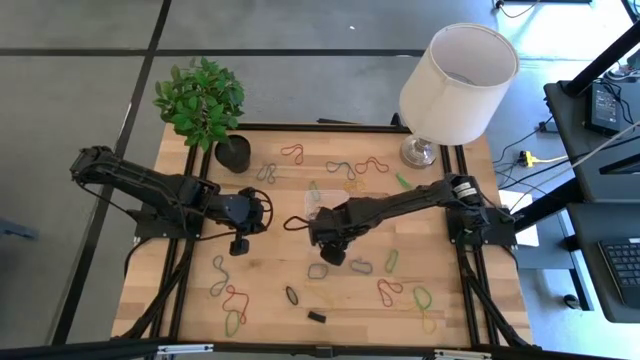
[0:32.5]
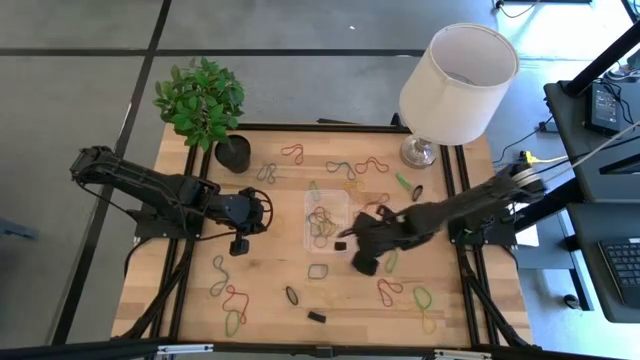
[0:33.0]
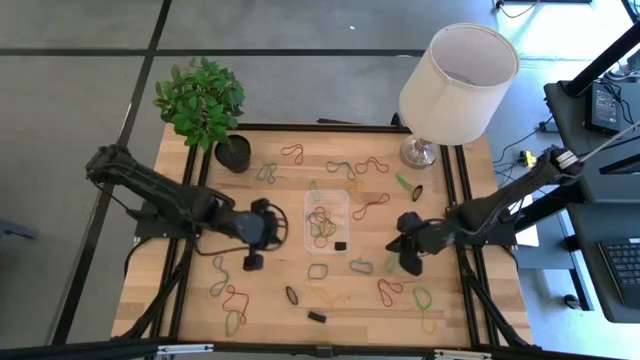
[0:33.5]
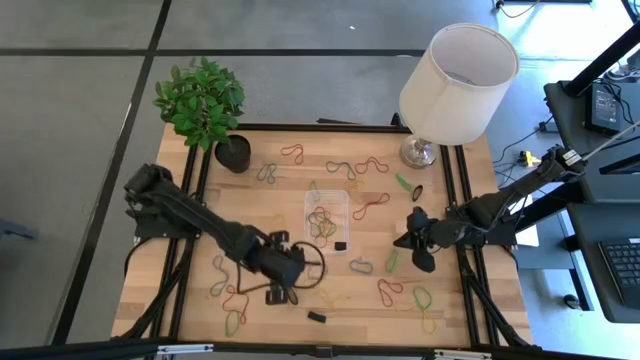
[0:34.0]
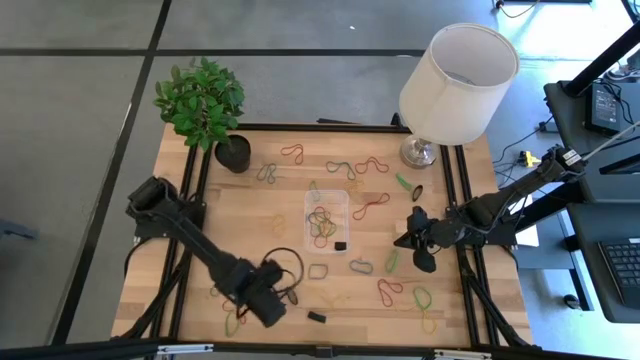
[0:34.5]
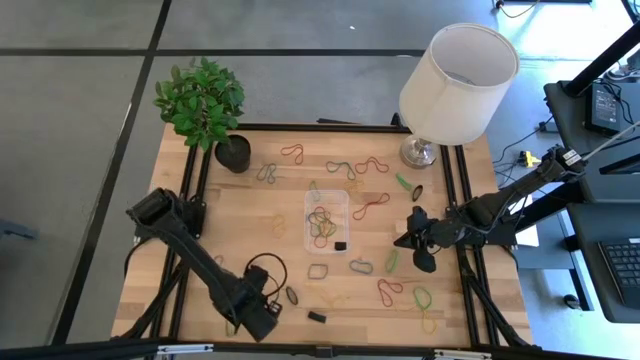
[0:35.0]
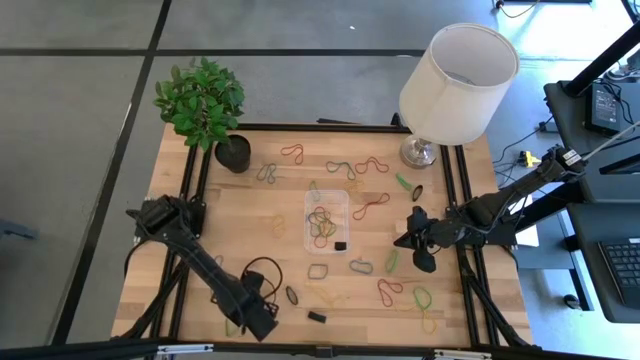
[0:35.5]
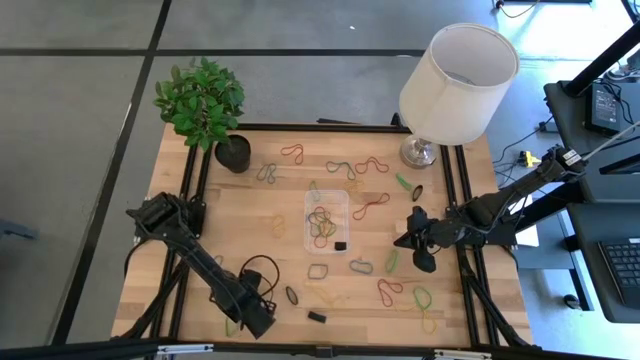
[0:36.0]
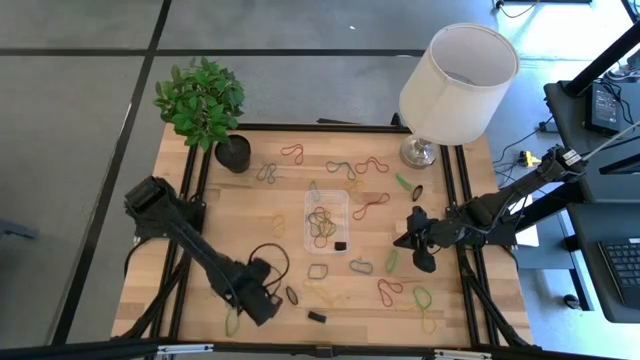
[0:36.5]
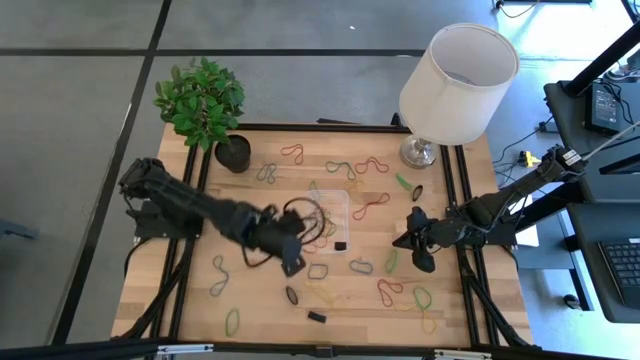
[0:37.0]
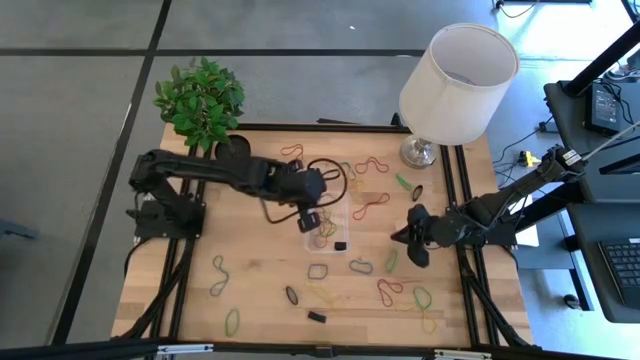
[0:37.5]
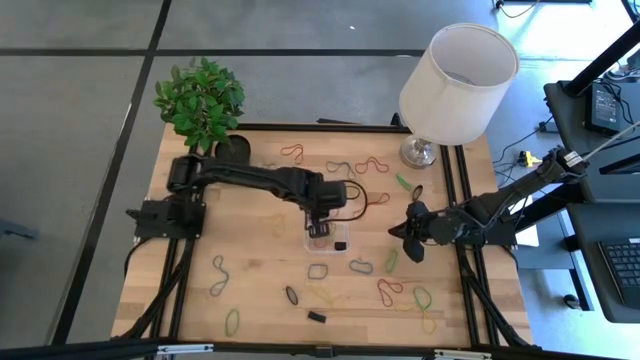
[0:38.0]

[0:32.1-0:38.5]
Task: Pick and place rubber bands into bin
Put the red rubber band into the transparent container

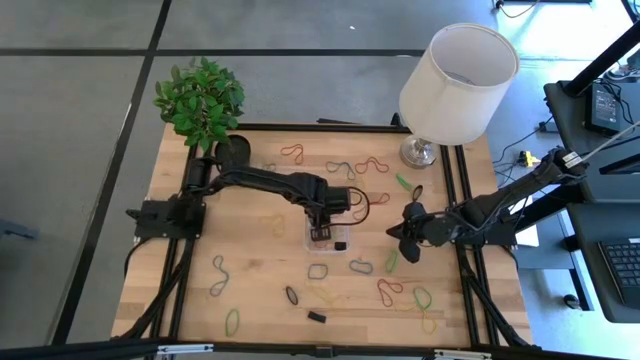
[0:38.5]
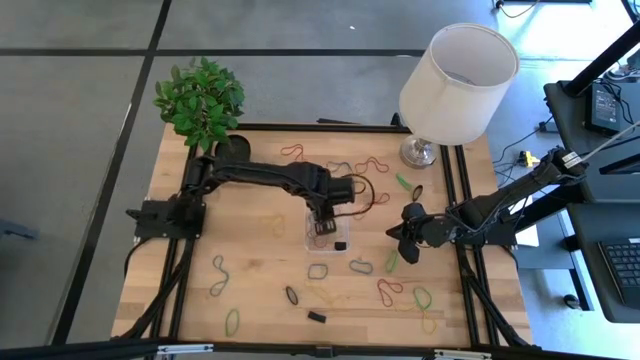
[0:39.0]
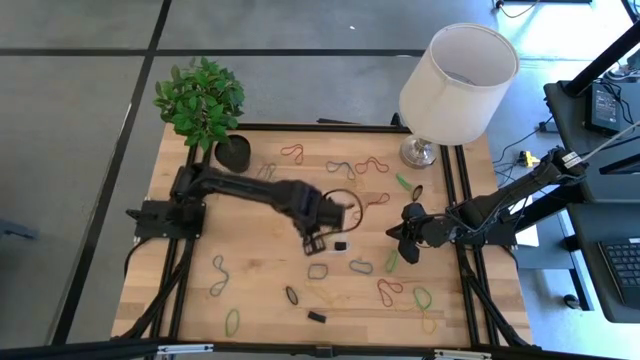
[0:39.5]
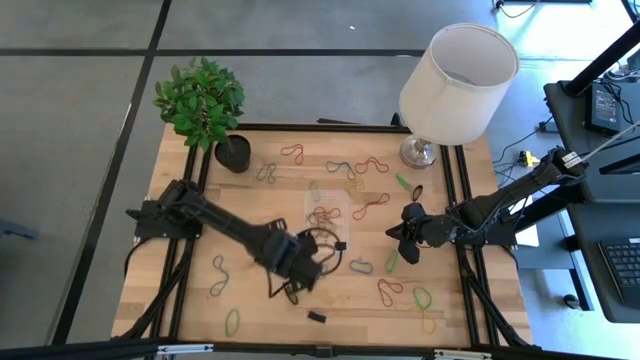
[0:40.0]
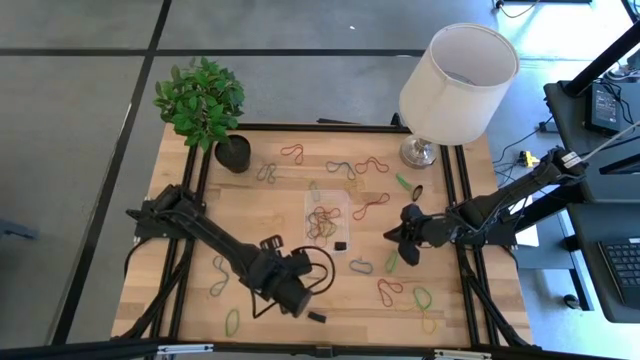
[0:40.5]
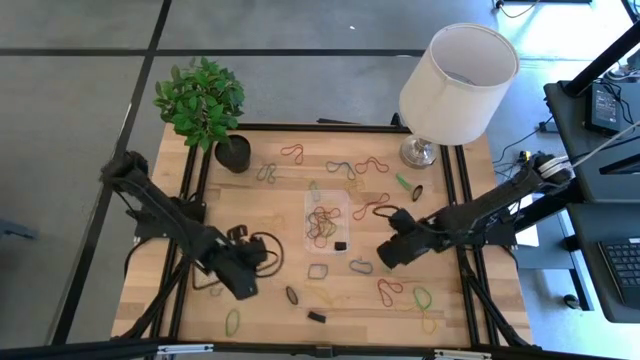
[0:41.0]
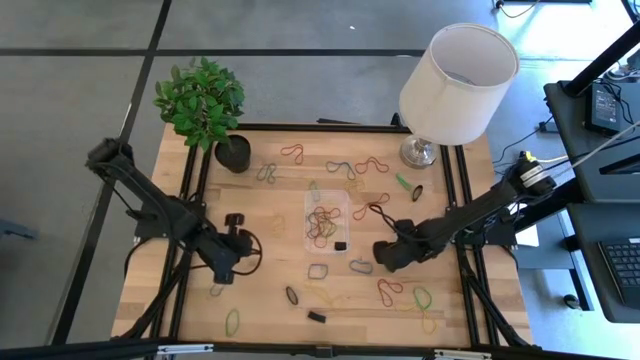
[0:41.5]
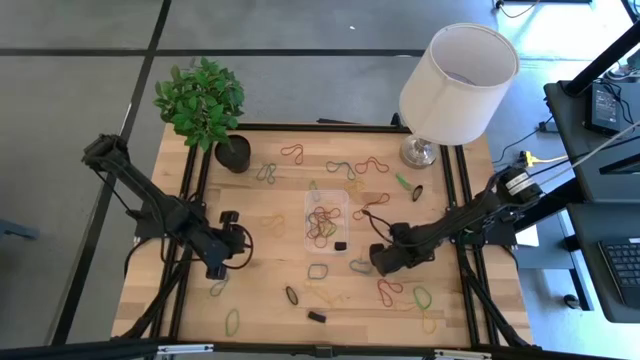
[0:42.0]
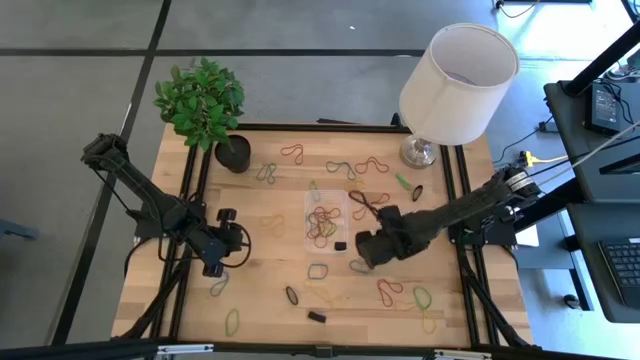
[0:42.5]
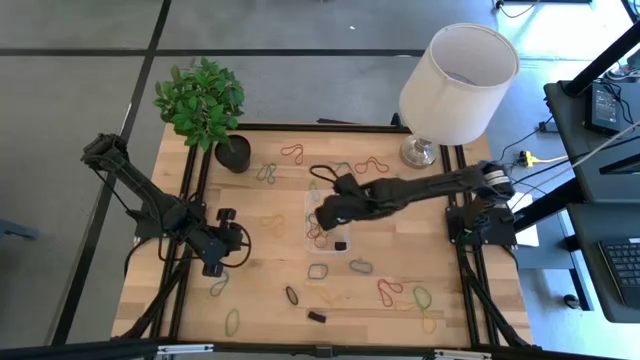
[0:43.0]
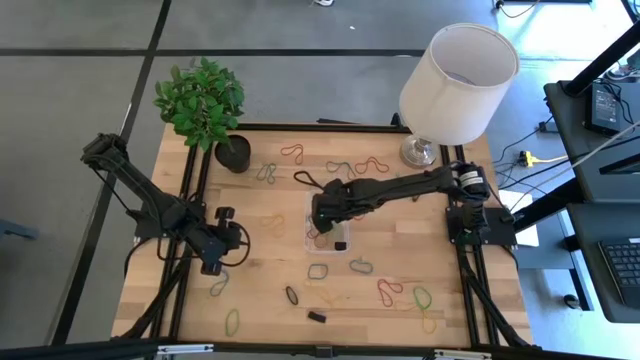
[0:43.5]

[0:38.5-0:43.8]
Put the green rubber band into the transparent container

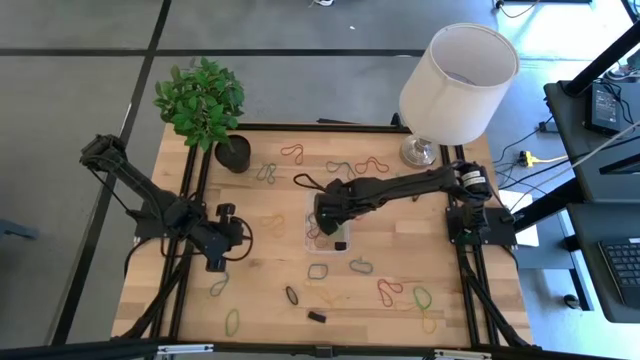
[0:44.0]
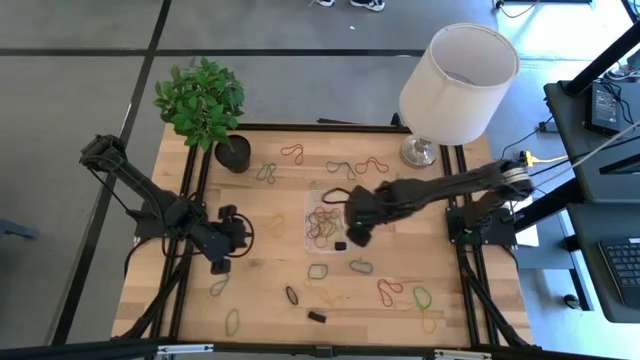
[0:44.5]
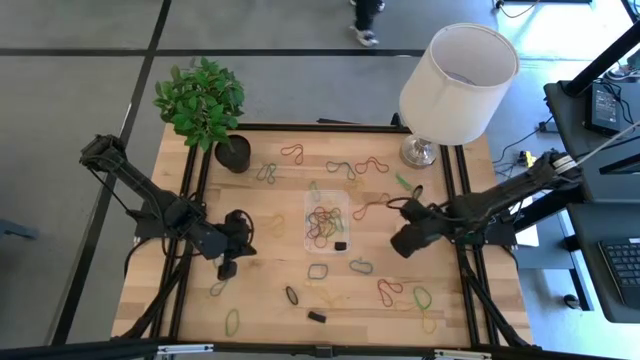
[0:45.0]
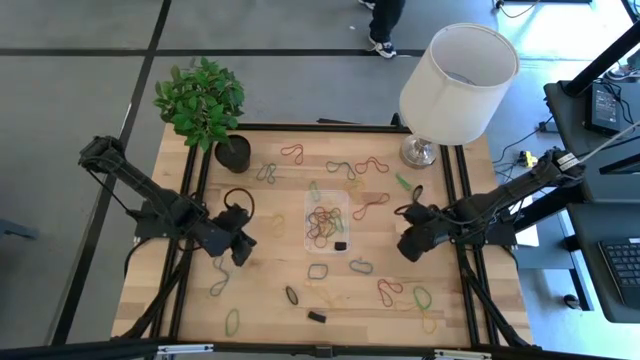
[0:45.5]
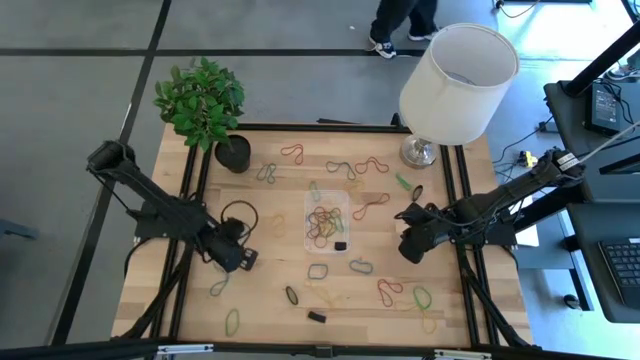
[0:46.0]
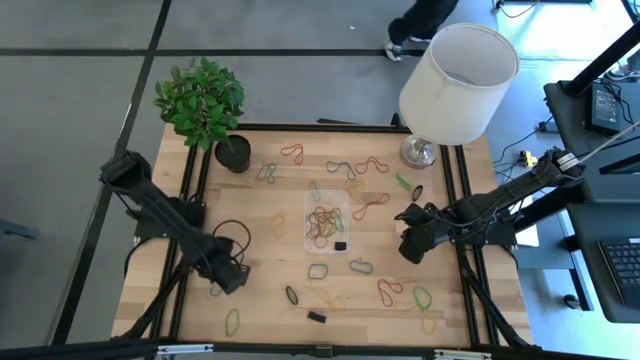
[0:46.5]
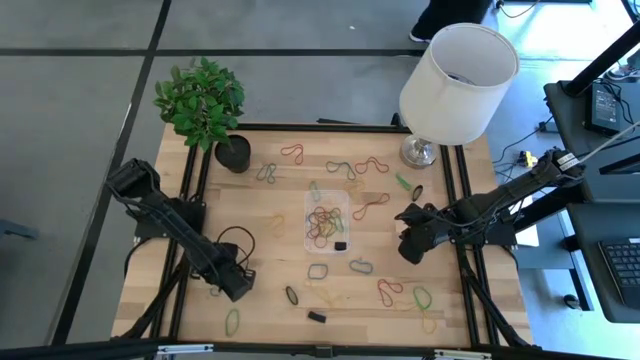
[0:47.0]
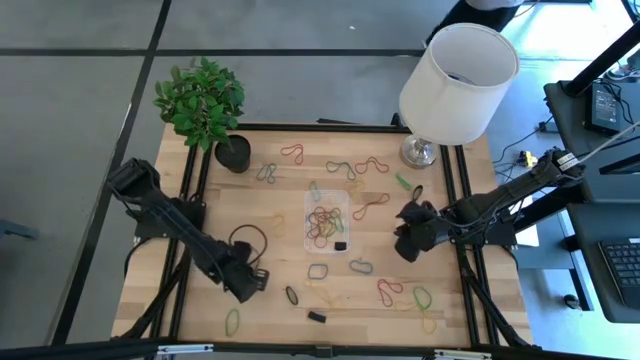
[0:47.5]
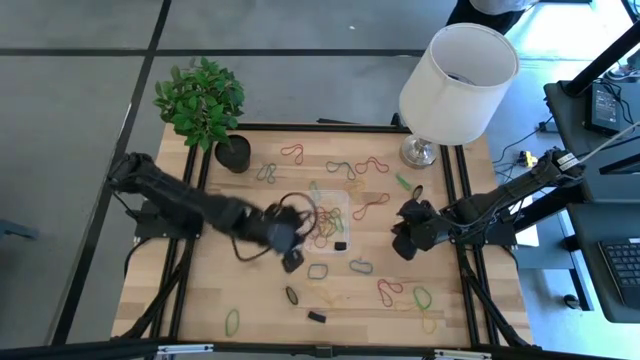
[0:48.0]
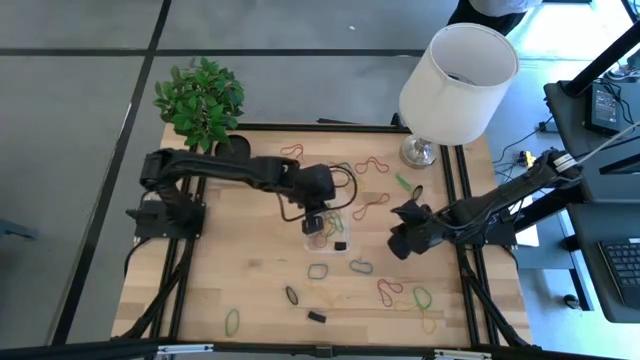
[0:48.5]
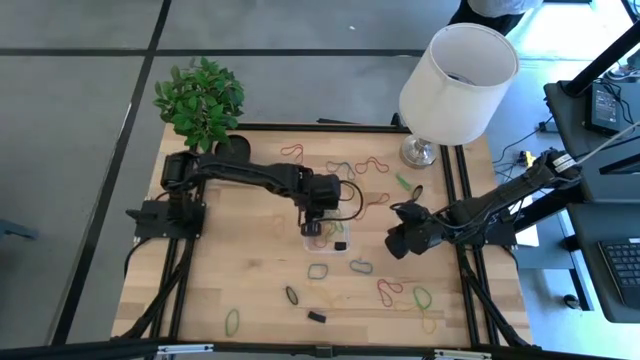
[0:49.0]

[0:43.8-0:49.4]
Put the blue rubber band into the transparent container

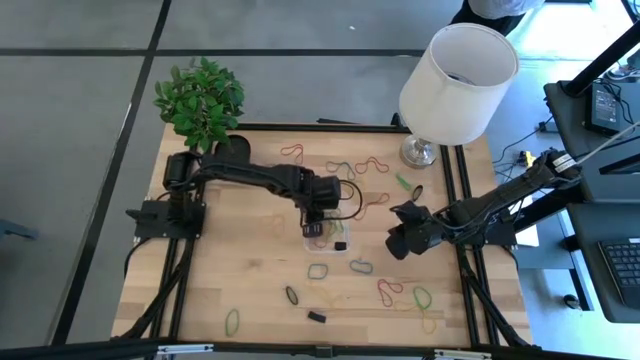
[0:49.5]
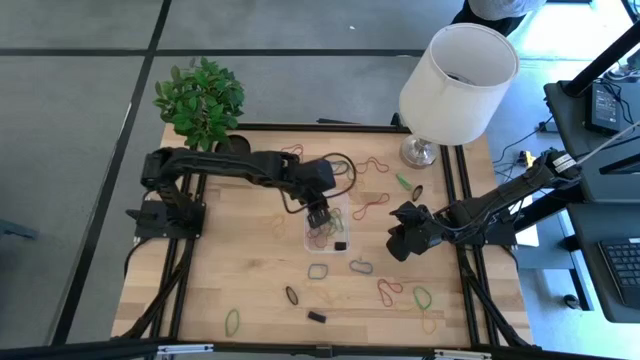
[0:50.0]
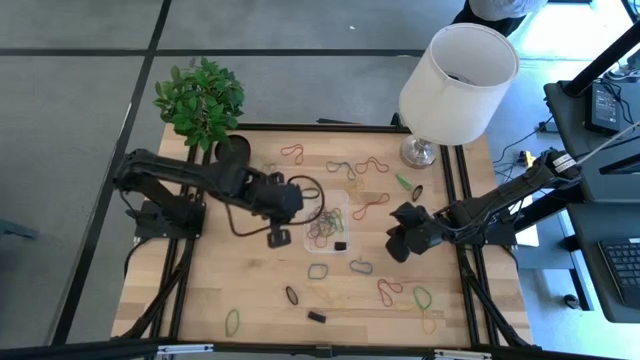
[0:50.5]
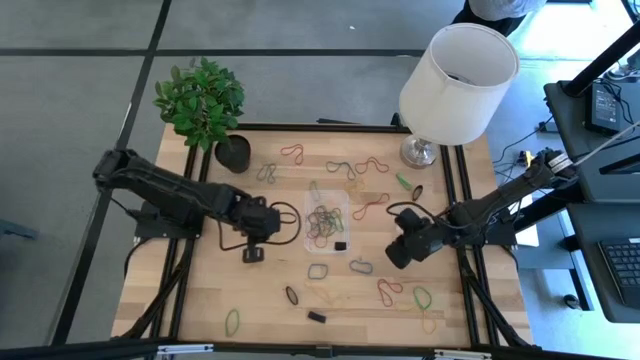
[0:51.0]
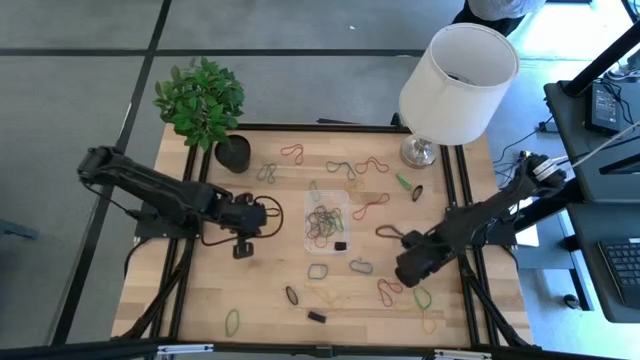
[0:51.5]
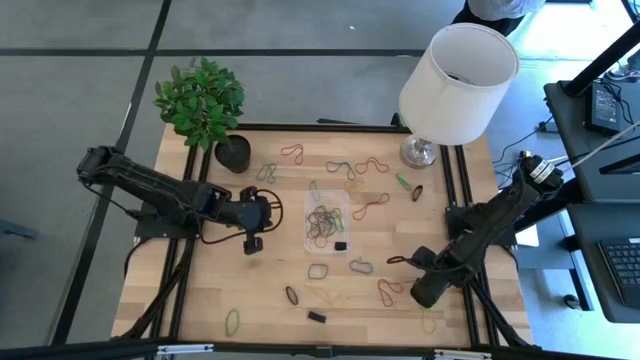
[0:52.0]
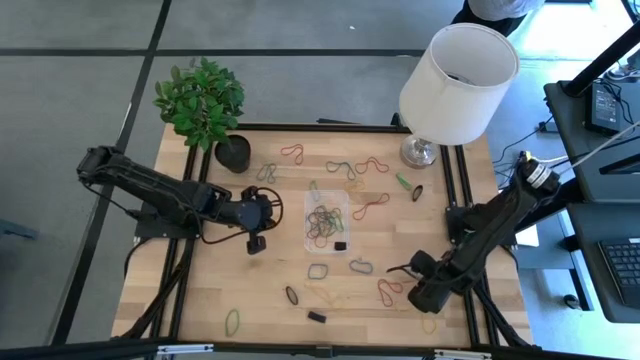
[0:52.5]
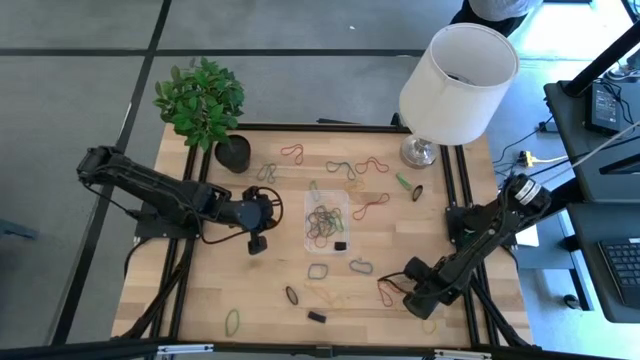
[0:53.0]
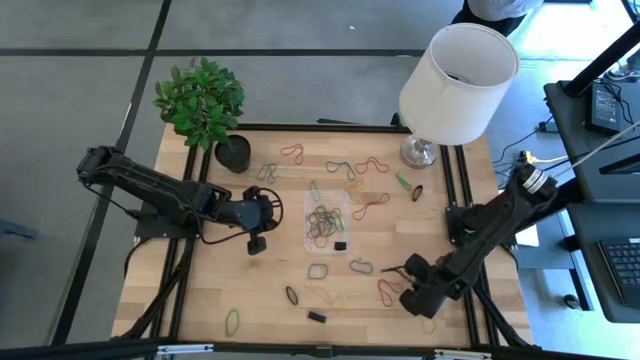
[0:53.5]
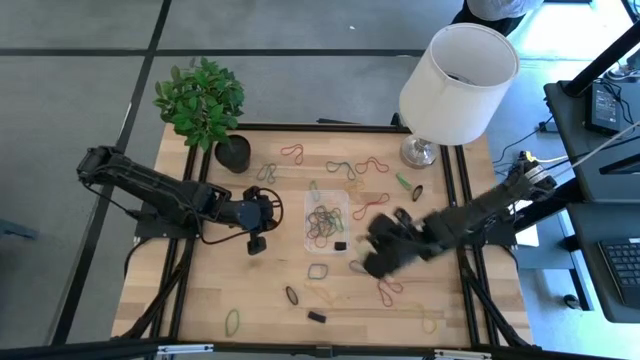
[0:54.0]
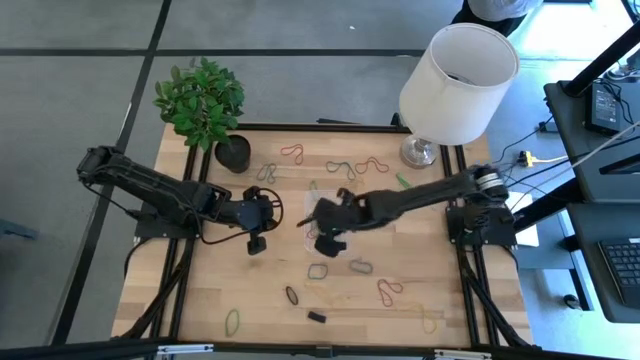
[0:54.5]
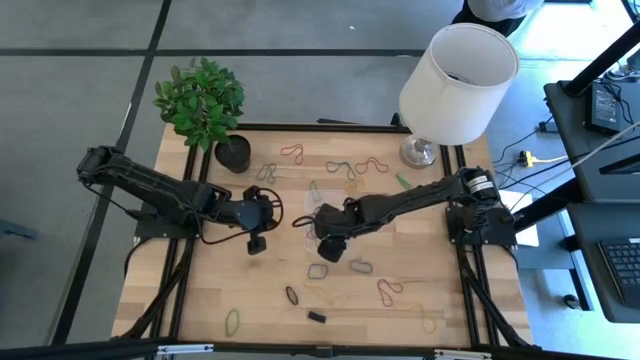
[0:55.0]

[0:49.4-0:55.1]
Put the green rubber band into the transparent container
